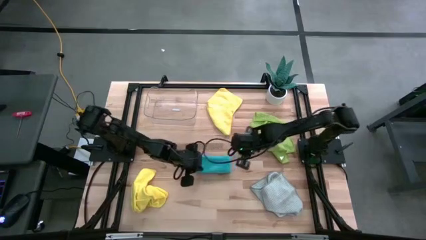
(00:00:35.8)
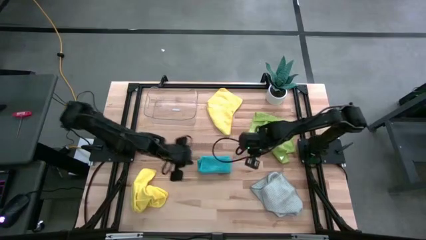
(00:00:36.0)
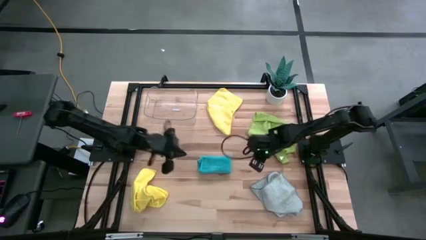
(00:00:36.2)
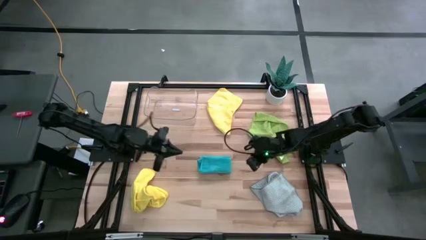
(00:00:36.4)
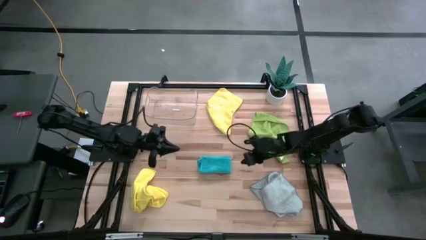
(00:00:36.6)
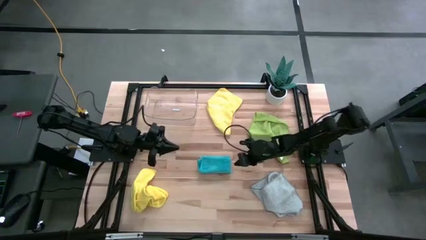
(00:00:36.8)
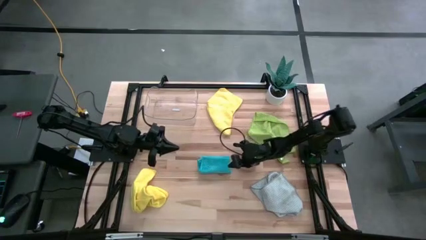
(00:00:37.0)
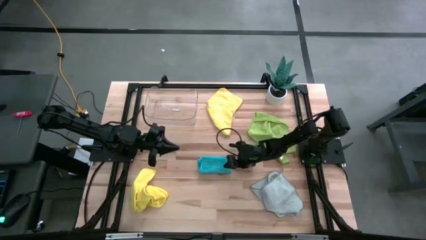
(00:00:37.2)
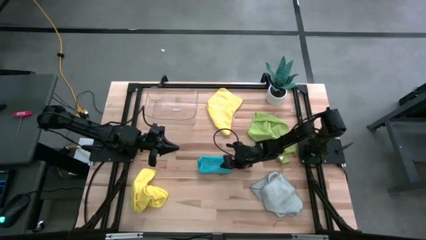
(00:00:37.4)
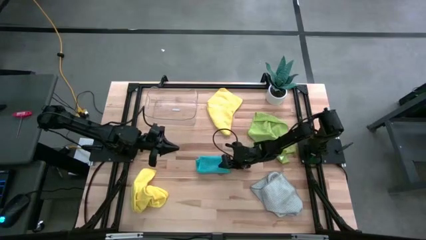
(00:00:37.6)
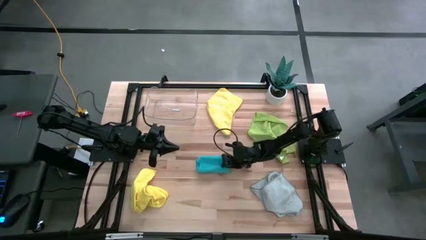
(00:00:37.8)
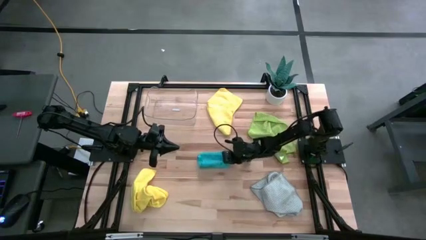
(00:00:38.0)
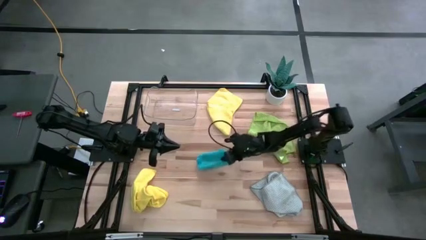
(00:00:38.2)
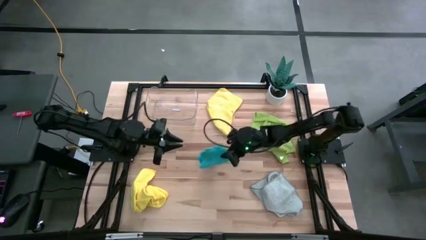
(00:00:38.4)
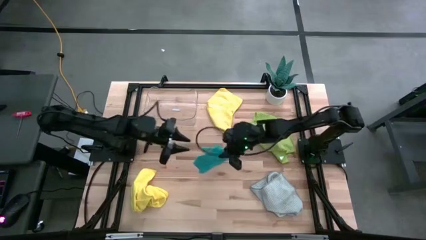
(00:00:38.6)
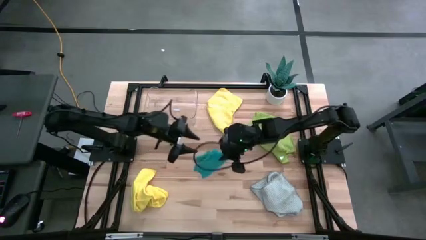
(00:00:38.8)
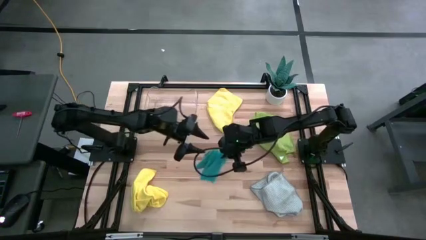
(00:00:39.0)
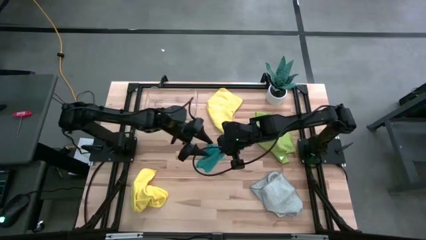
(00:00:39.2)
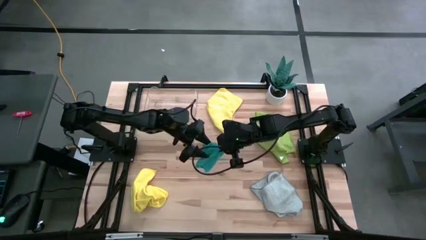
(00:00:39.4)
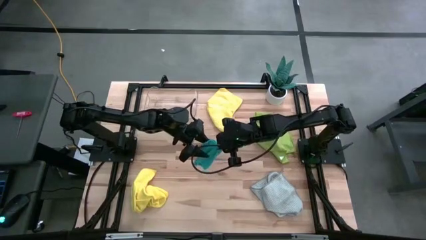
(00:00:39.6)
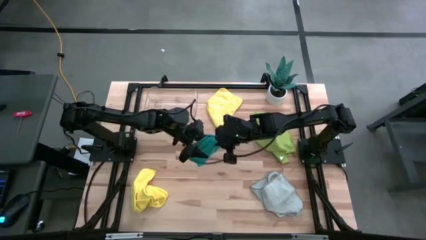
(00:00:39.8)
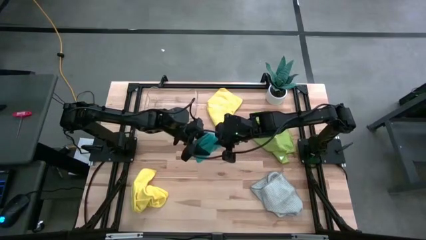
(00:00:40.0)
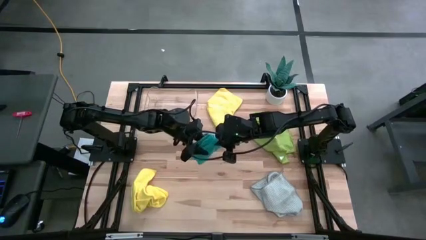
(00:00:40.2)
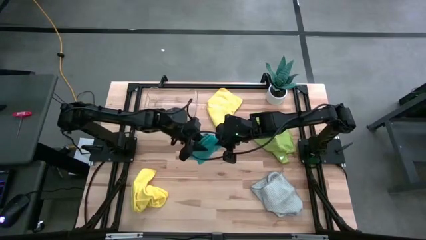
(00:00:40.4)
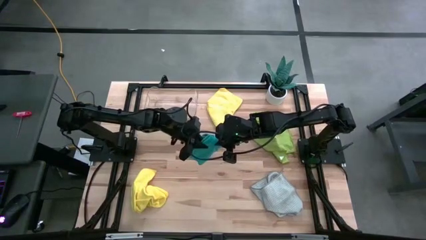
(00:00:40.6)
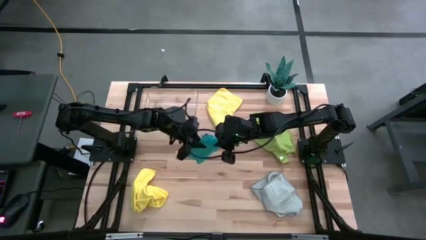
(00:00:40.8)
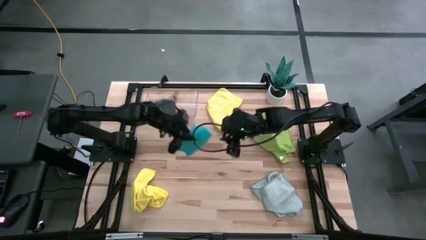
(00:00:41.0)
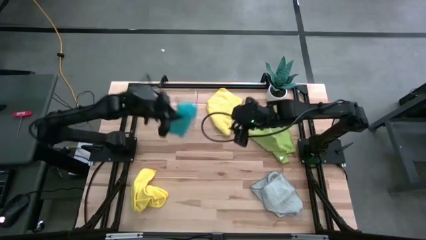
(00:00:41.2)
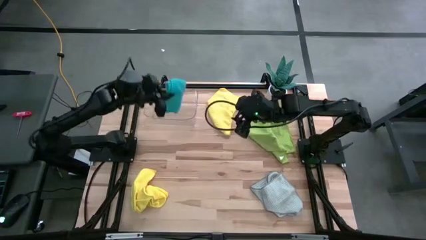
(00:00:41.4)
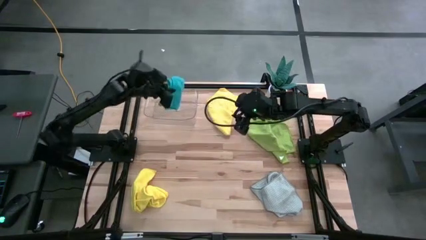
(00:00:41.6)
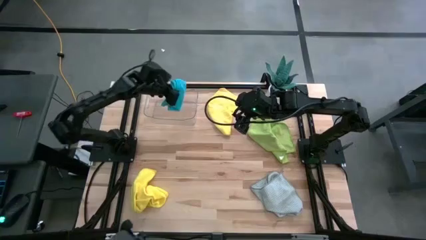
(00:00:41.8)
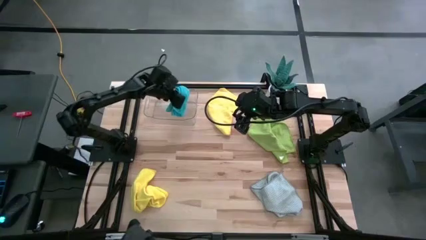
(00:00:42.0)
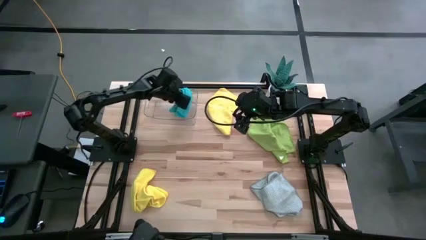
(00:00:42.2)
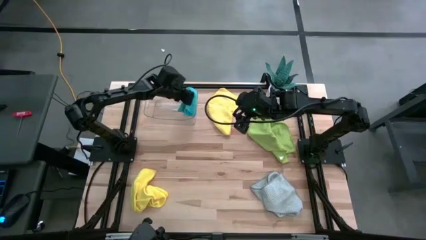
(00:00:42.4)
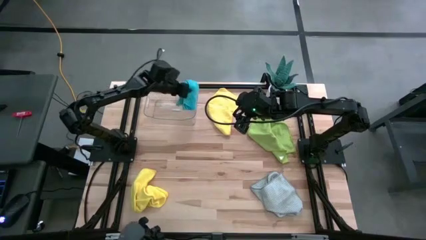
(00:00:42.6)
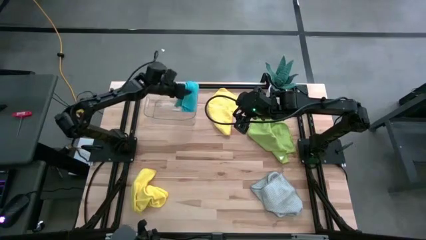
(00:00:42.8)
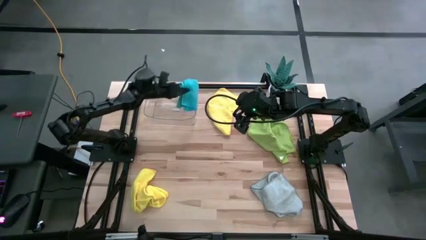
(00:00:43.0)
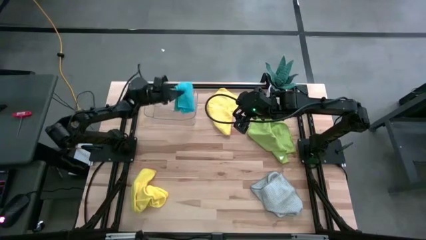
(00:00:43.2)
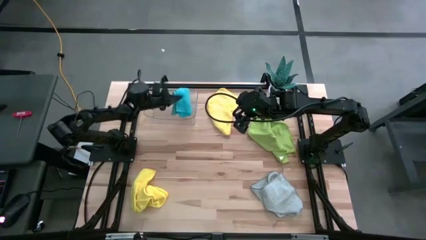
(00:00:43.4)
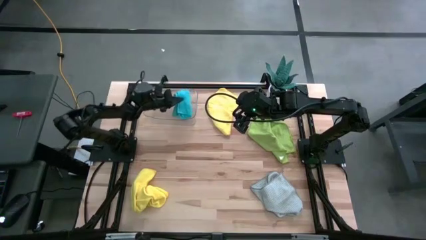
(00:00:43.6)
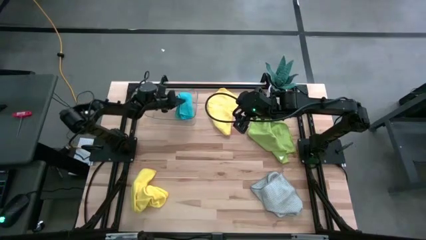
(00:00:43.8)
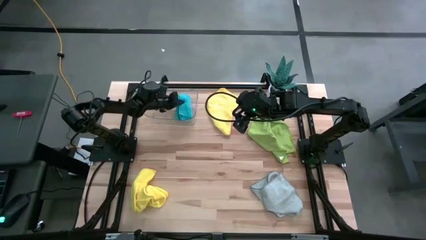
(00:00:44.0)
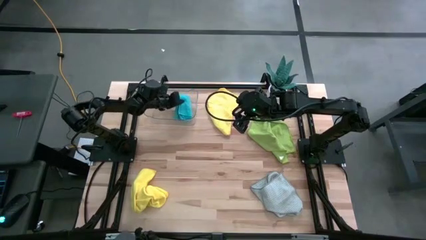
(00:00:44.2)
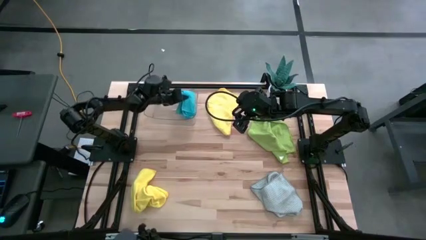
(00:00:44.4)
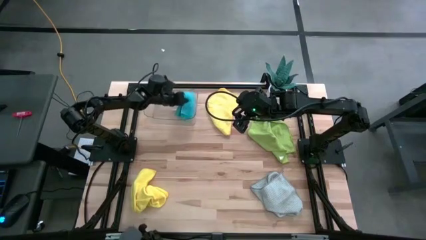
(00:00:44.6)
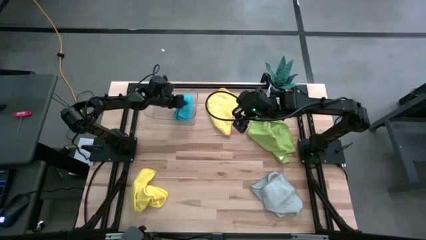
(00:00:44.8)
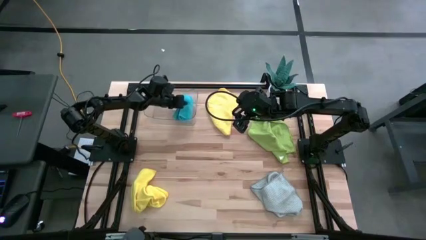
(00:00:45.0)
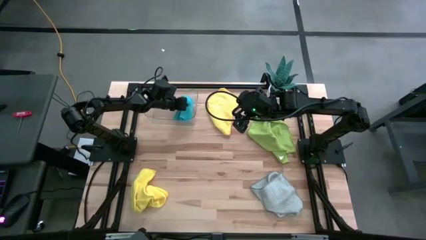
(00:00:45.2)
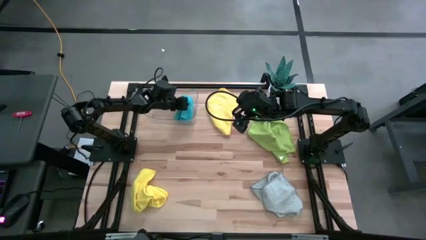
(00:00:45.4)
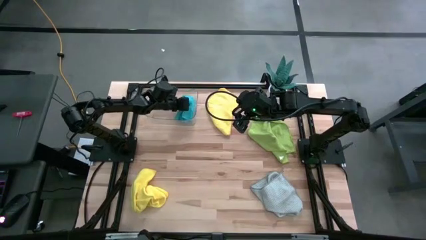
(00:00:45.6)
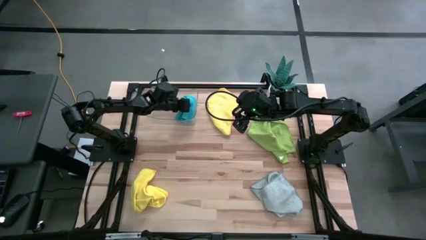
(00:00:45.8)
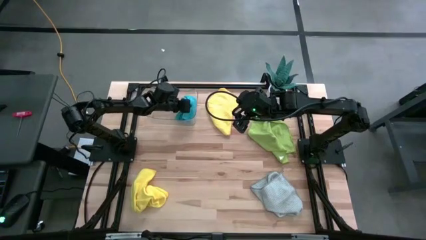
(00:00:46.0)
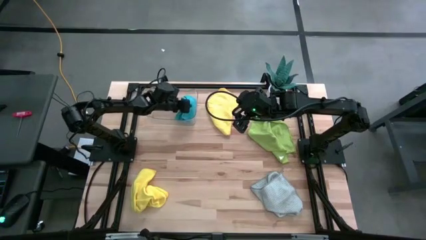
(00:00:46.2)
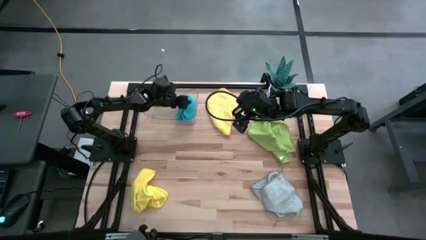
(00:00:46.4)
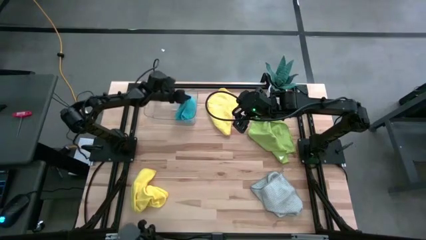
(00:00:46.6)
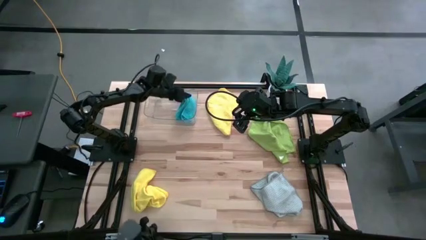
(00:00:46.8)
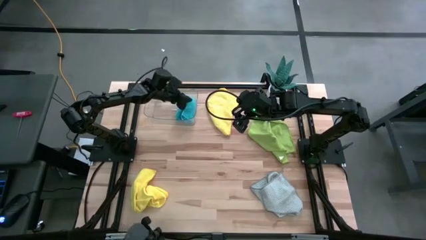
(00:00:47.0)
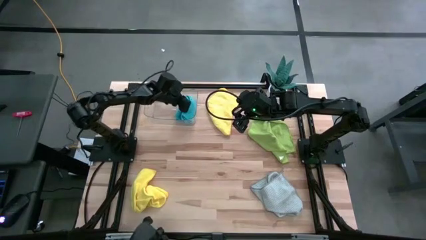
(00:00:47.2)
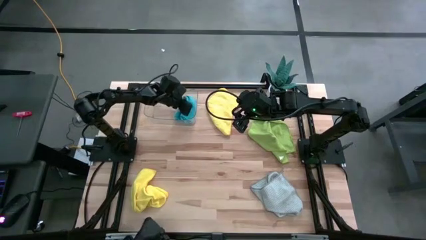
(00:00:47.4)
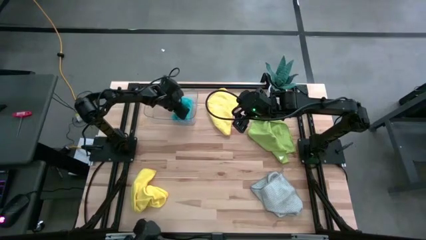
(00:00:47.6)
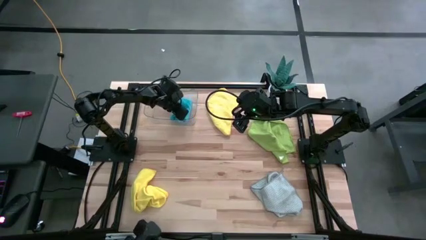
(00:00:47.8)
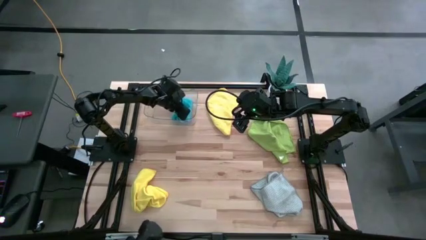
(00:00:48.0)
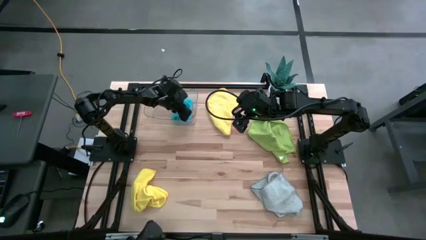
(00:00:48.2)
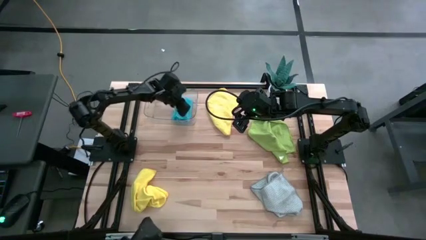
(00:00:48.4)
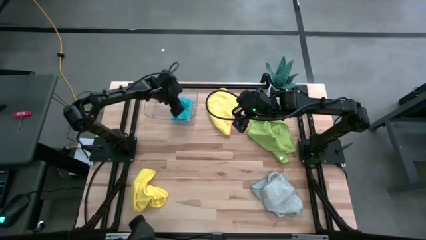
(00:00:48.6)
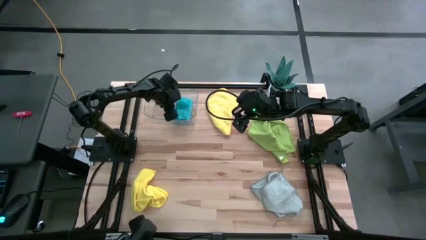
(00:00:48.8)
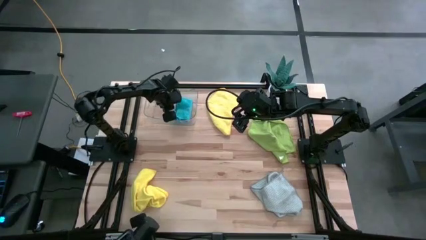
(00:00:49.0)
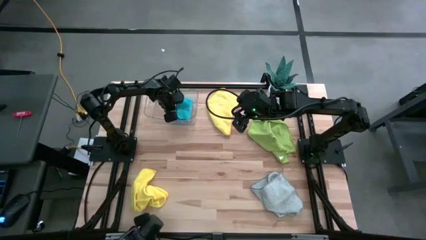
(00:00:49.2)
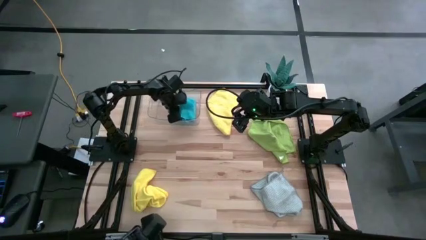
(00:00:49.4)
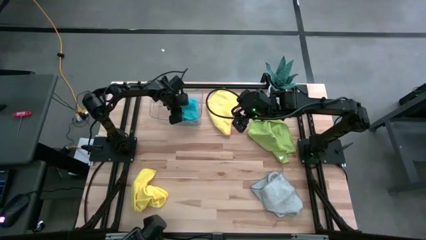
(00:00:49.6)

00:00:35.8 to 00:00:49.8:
Task: Fold microfiber towels
Put the blue towel into the transparent bin
